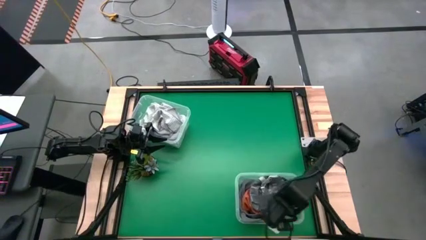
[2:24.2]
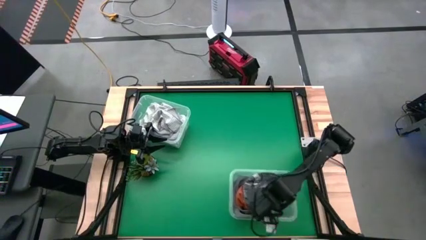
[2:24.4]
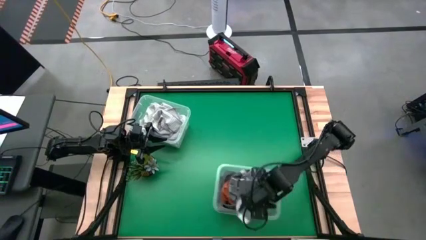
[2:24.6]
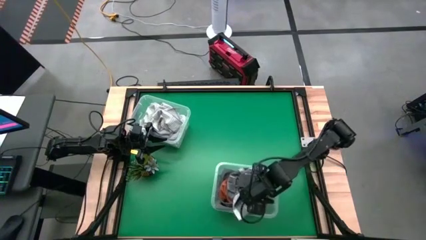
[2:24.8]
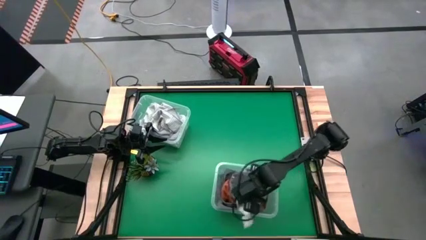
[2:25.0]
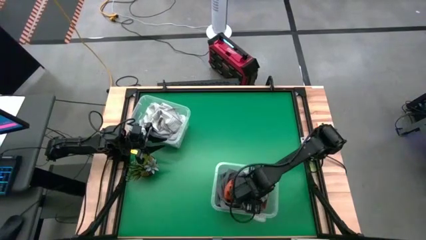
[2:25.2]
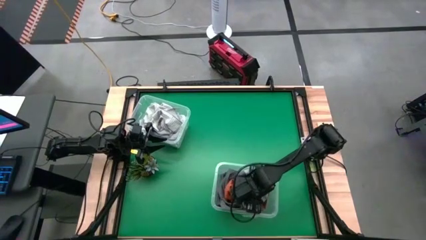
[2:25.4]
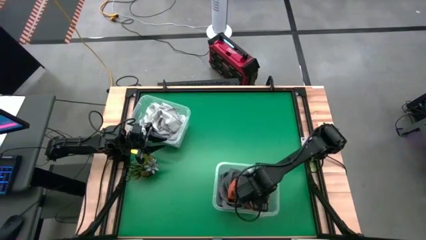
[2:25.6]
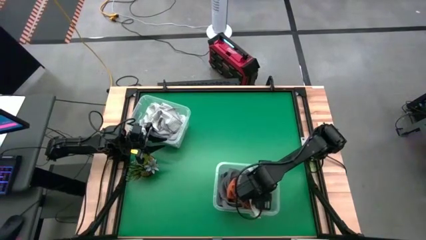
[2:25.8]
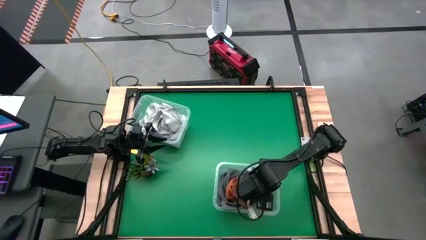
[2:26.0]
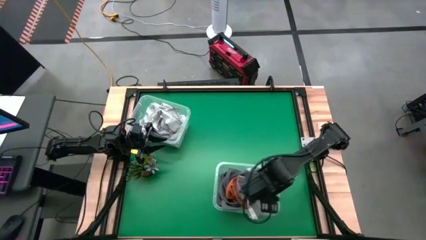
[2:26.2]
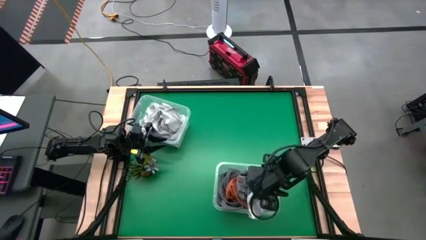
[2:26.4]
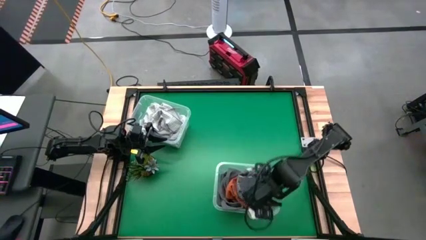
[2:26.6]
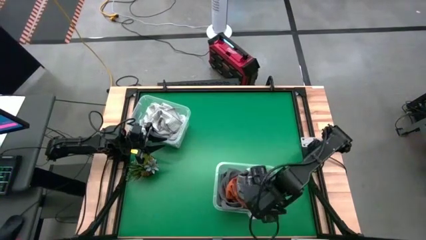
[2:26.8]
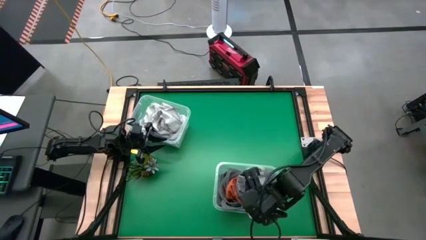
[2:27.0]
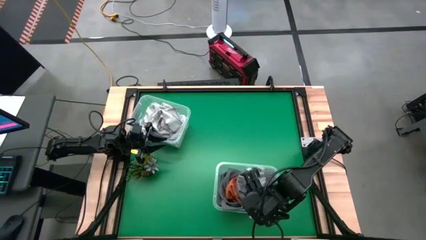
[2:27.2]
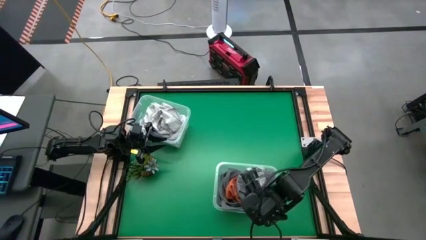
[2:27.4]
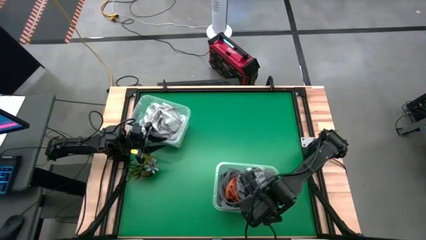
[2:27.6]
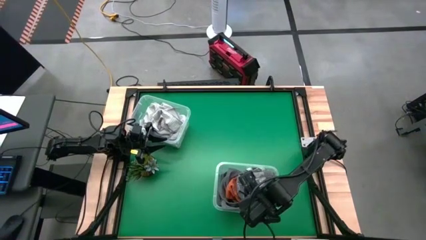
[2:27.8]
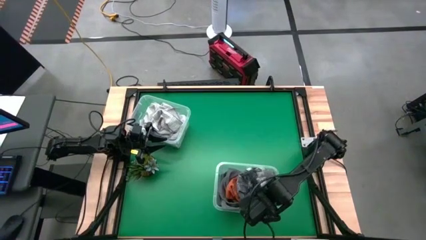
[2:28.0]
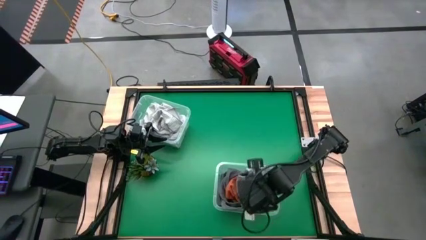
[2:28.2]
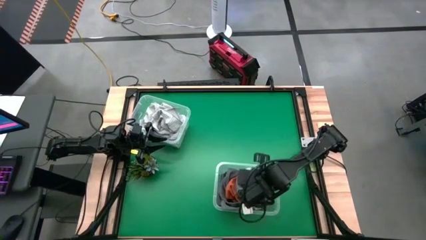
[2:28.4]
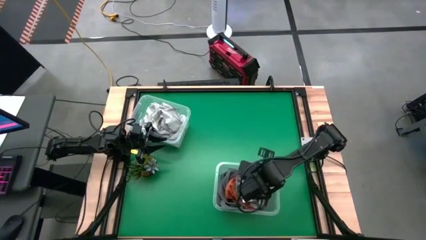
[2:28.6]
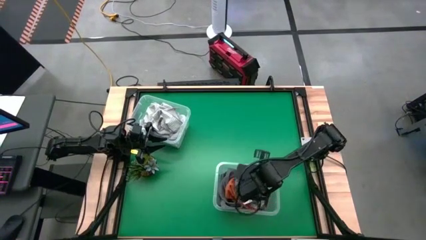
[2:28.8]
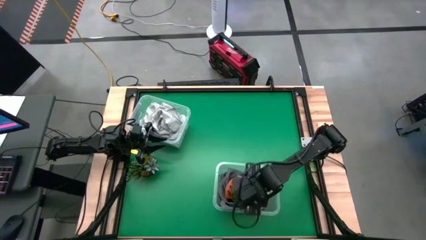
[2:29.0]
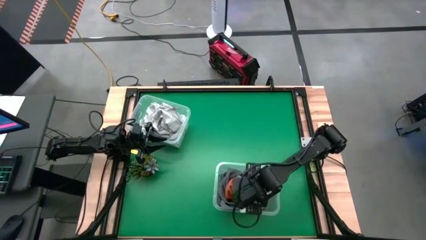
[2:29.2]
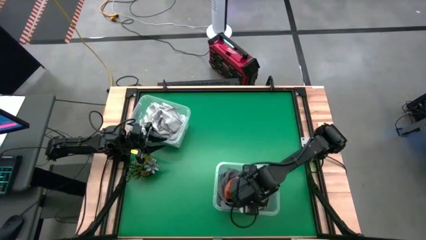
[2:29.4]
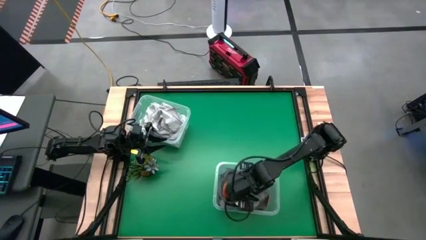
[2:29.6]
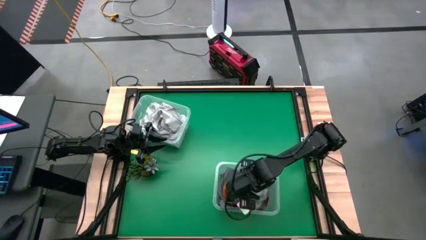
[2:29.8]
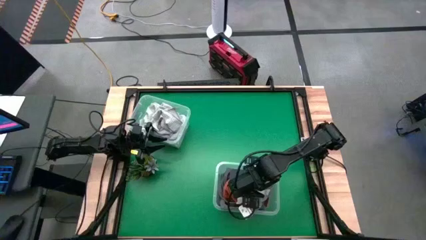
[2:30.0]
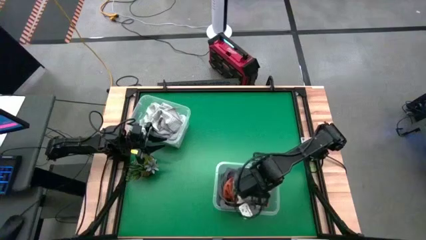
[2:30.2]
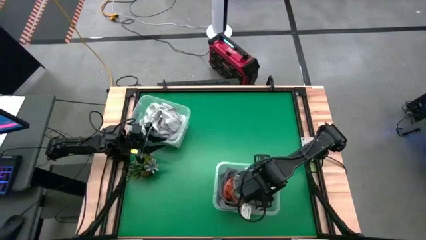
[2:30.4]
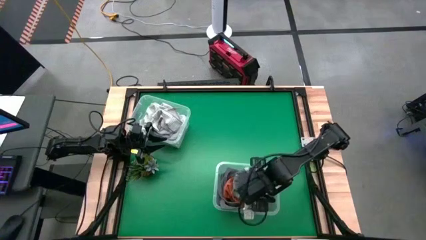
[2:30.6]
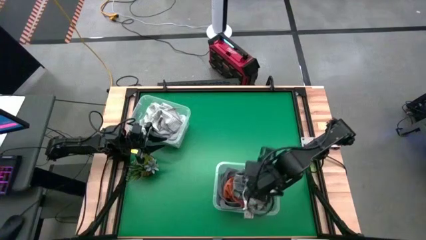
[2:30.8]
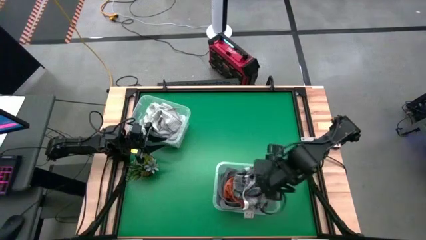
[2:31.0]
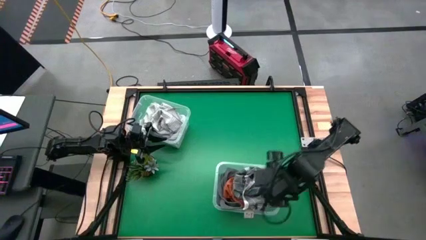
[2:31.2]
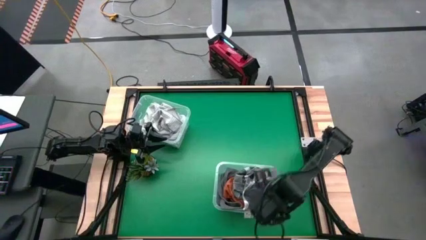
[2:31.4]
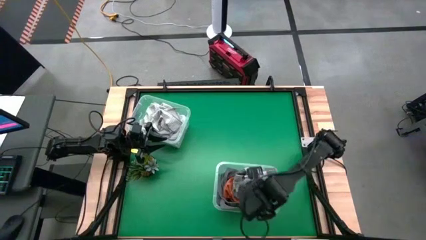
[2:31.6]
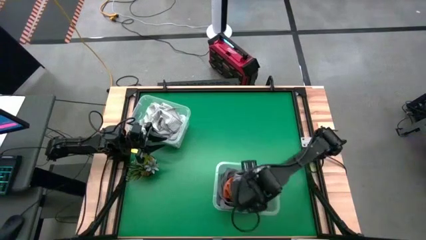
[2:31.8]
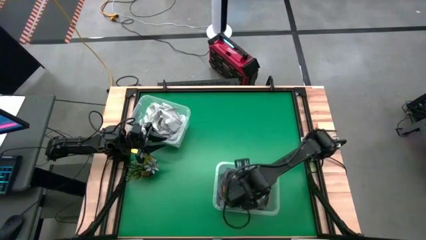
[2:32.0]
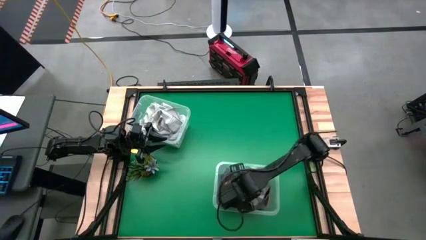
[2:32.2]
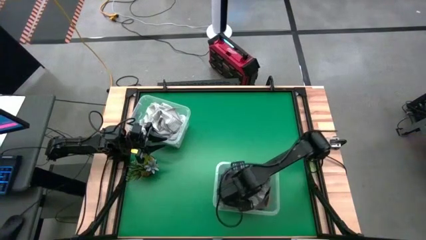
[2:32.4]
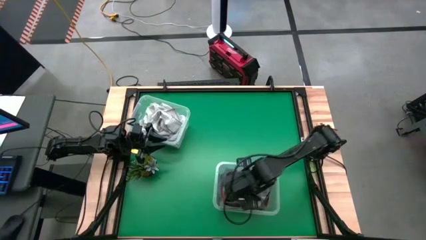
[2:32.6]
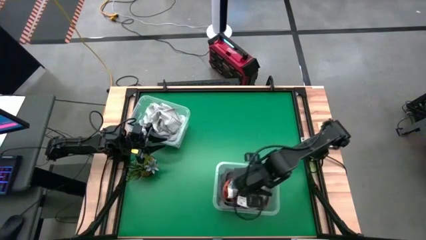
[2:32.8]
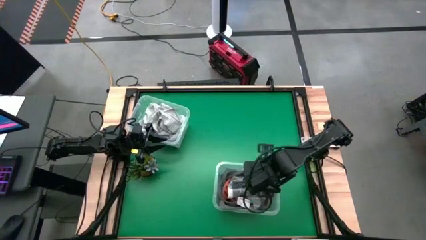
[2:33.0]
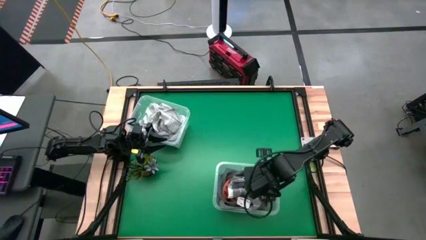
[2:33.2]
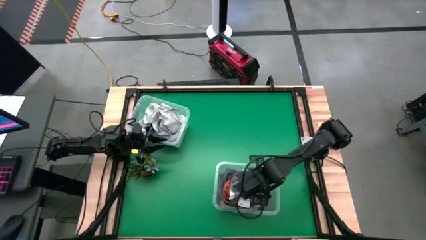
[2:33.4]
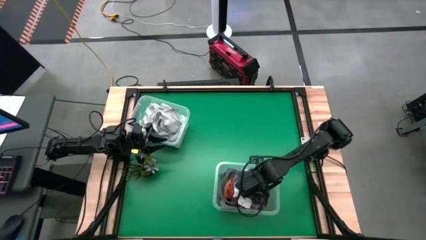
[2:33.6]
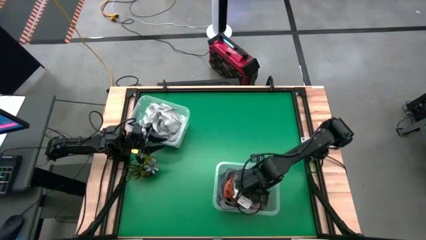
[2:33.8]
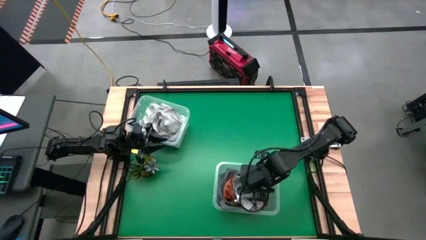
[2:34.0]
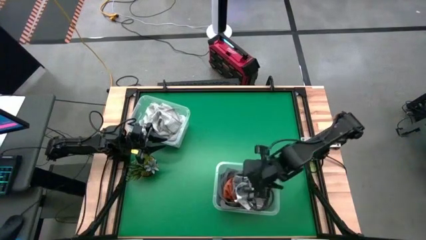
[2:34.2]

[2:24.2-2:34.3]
Task: Sort towels by color in basket
Adjust the gray checkered towel

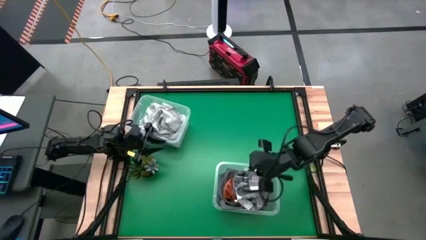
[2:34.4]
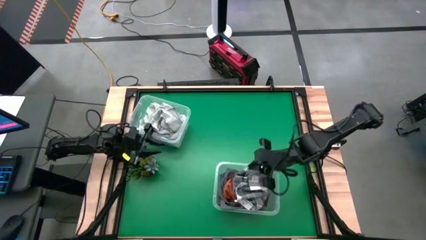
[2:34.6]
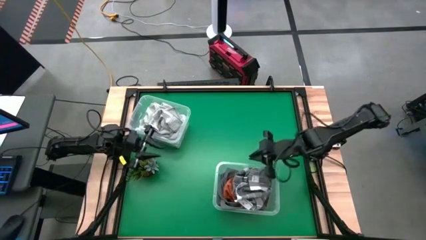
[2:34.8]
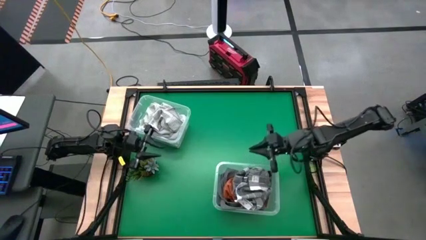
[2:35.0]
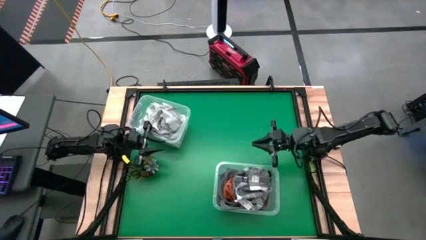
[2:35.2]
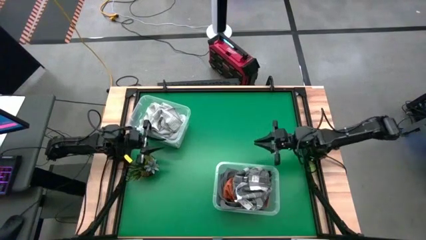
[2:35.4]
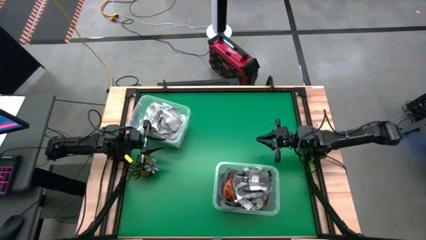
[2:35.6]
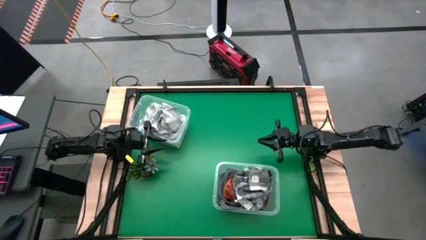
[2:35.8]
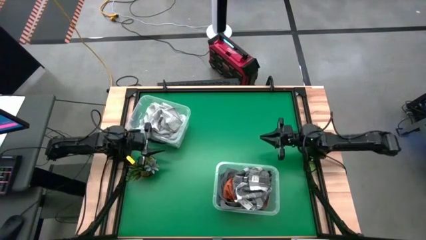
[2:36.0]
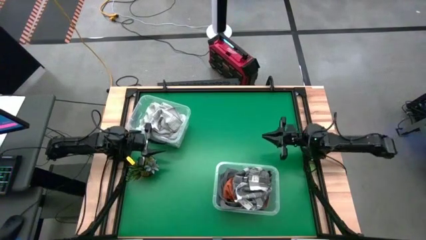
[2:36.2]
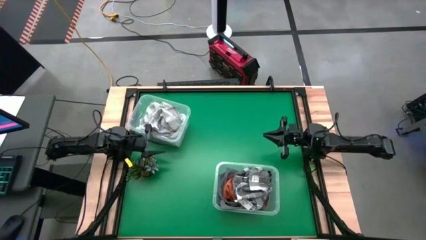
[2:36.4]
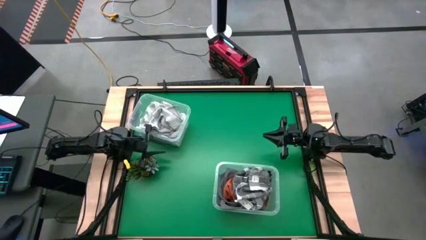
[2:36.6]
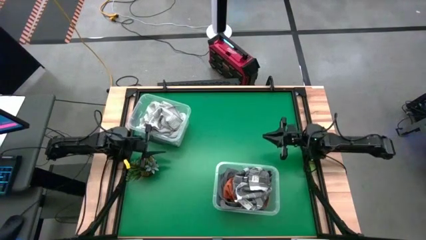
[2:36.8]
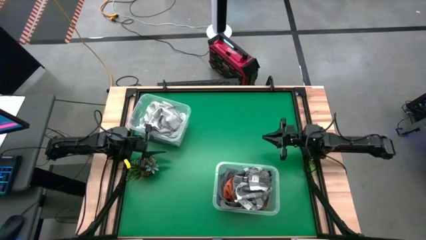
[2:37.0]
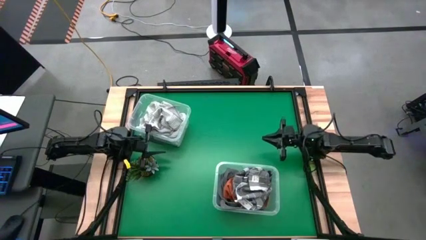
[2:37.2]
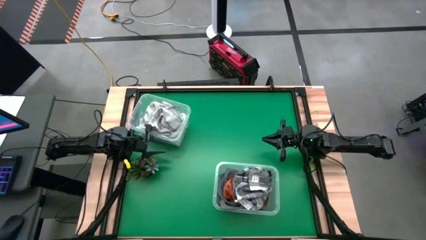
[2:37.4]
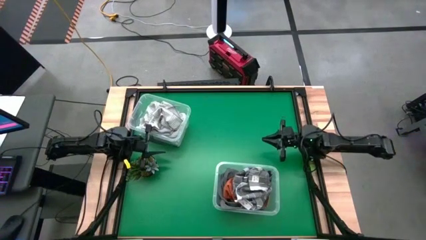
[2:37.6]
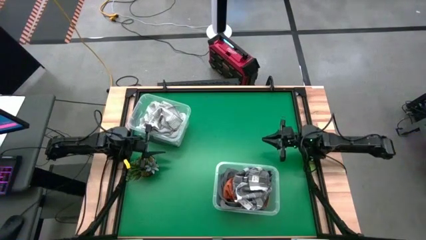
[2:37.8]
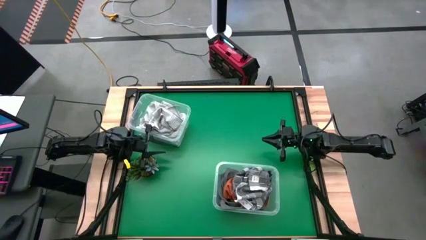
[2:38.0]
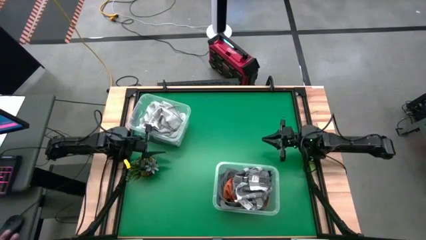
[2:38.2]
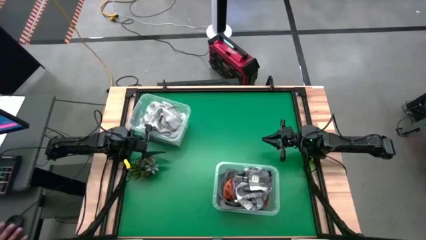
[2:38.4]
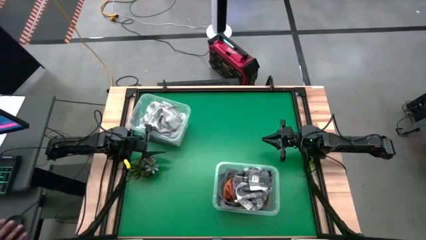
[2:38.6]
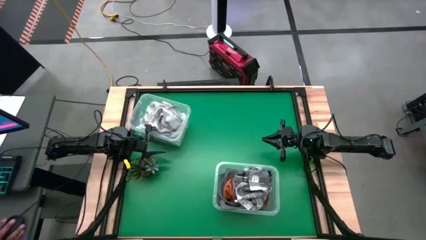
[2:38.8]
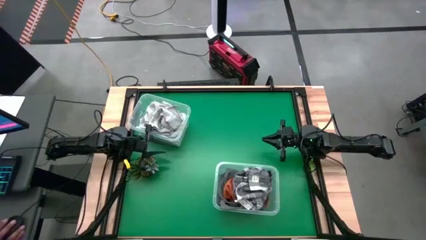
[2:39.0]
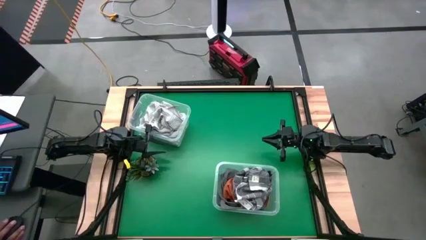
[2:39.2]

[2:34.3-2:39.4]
Return to Home Position
